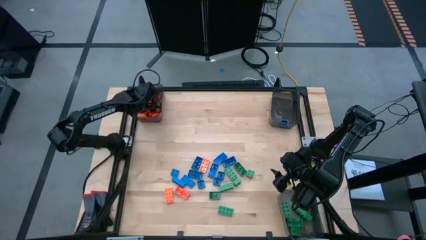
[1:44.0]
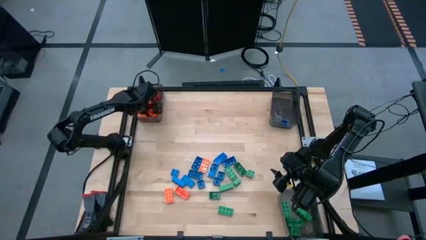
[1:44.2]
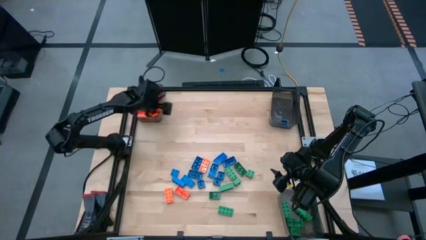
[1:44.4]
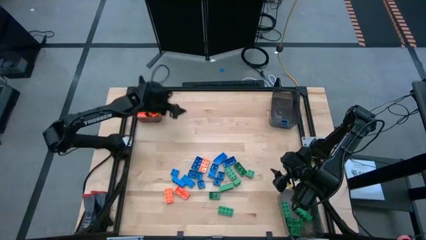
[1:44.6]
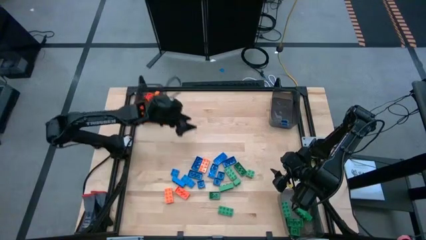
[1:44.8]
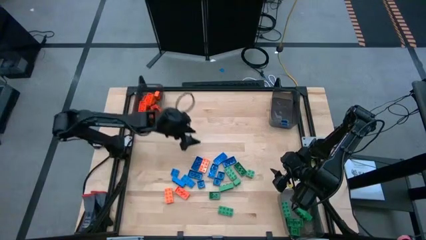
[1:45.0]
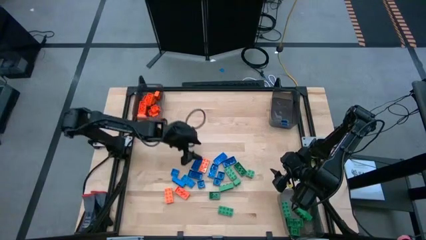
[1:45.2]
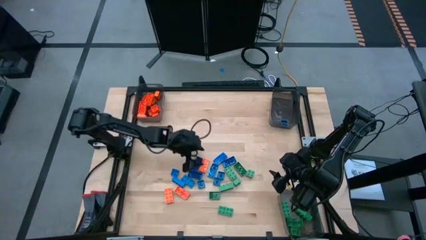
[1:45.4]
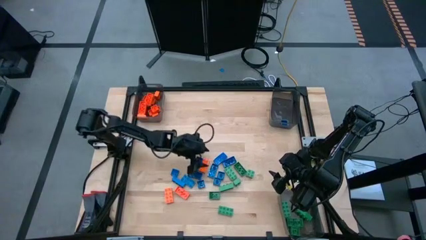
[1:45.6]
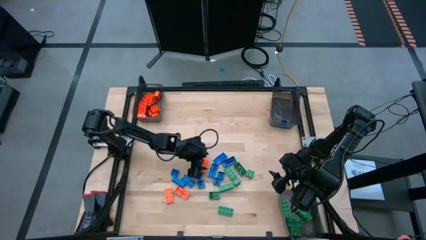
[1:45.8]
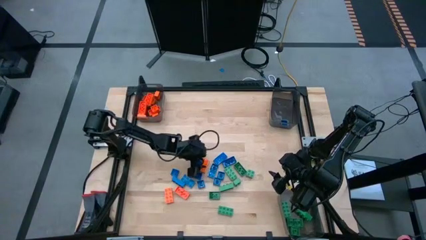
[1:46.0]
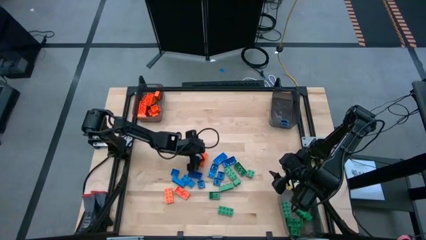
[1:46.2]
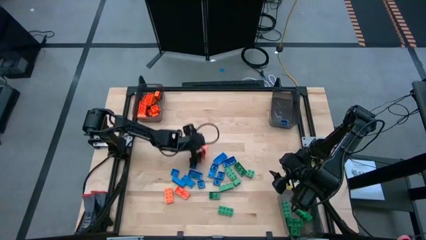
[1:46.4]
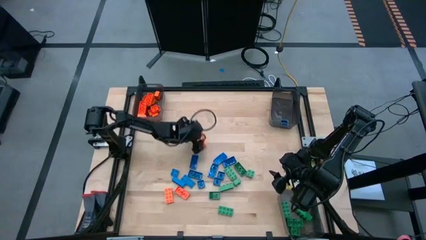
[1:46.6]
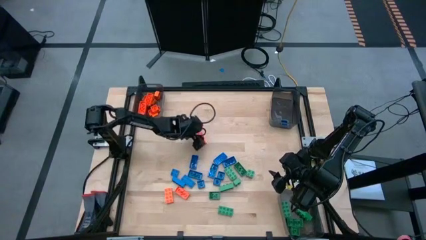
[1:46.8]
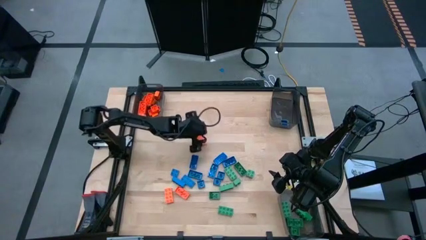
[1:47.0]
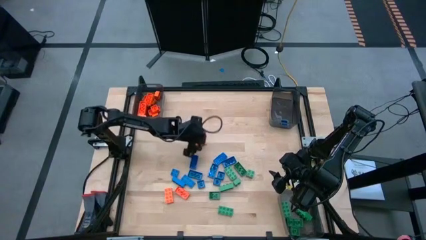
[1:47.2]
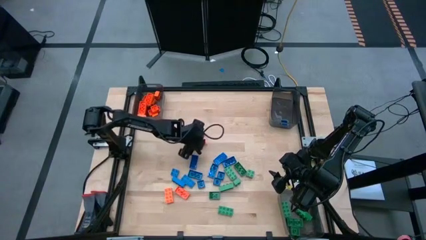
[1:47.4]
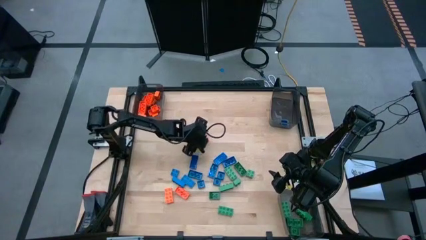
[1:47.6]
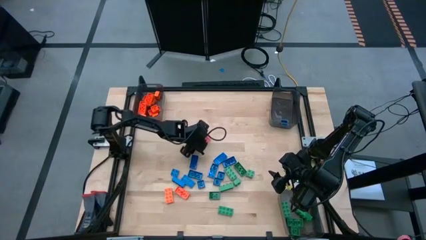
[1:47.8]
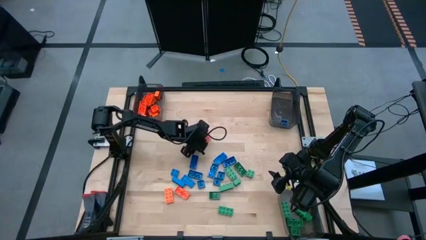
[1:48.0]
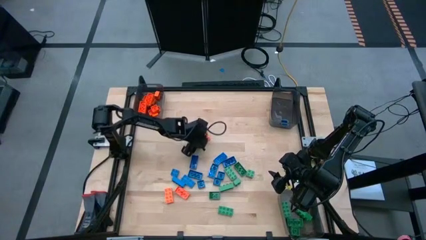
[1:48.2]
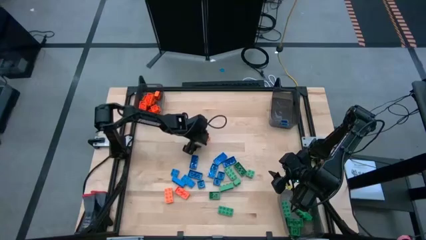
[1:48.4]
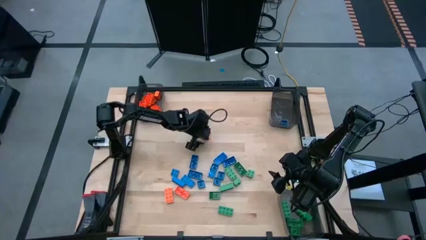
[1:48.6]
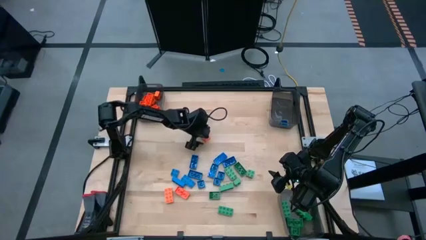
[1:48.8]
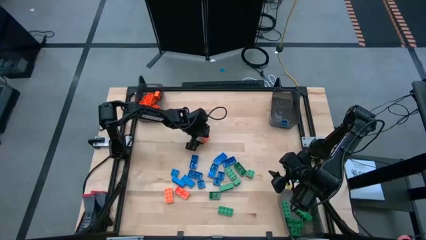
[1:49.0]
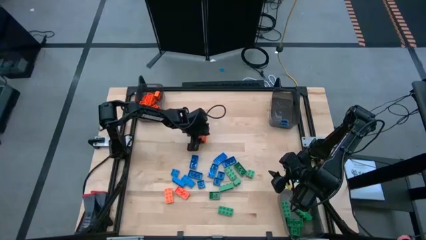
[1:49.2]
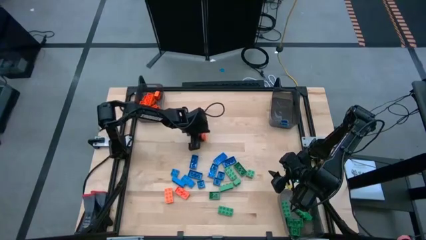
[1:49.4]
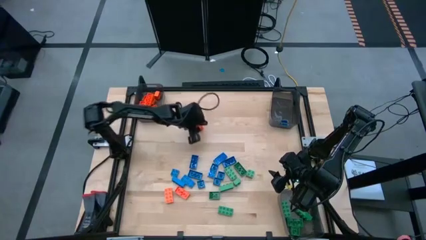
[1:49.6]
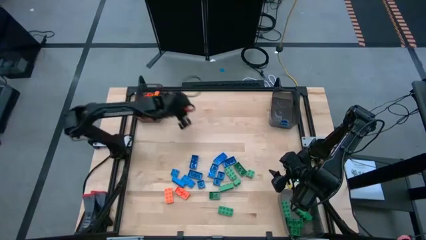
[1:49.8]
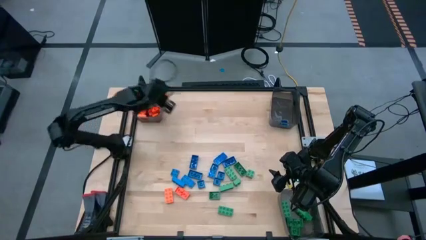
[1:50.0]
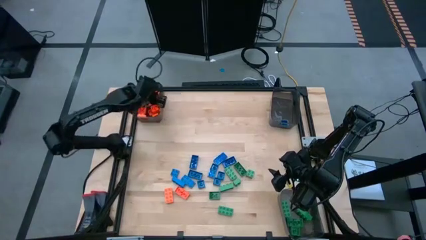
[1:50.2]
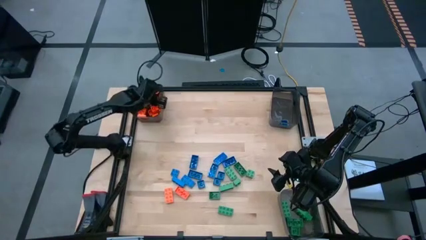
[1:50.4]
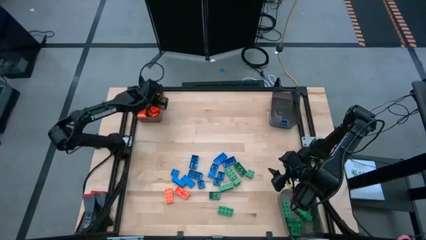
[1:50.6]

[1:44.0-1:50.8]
Task: Sort blocks
Put the orange game piece into the top left black bin

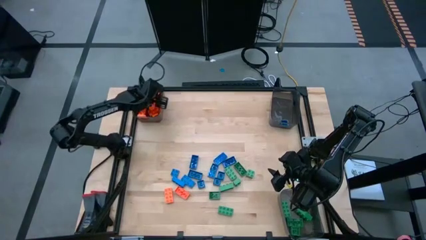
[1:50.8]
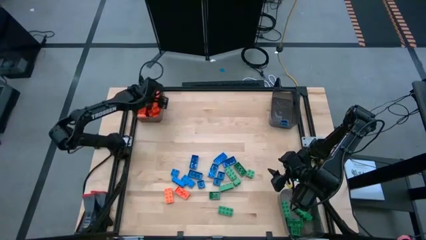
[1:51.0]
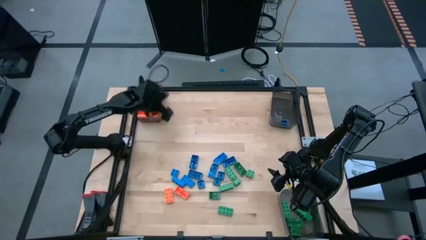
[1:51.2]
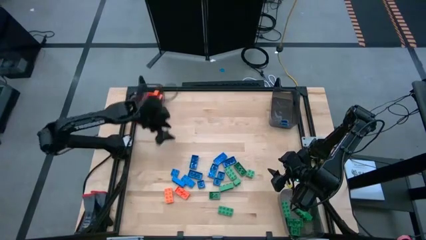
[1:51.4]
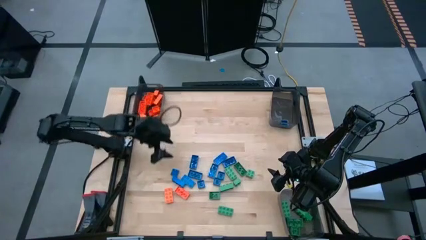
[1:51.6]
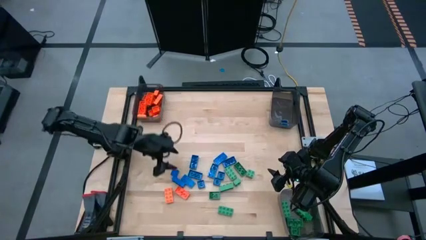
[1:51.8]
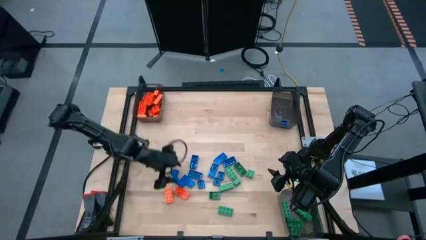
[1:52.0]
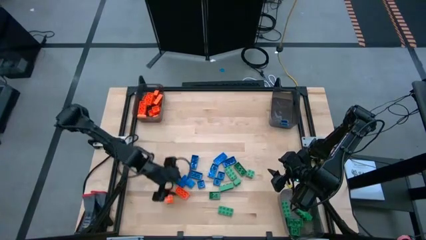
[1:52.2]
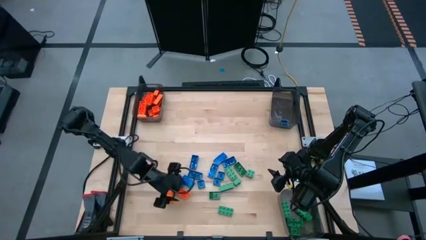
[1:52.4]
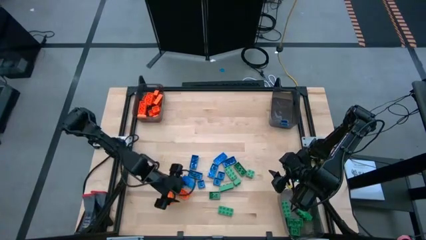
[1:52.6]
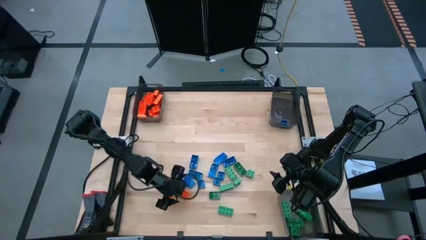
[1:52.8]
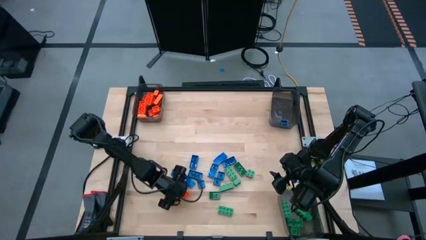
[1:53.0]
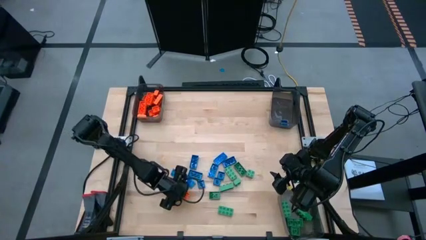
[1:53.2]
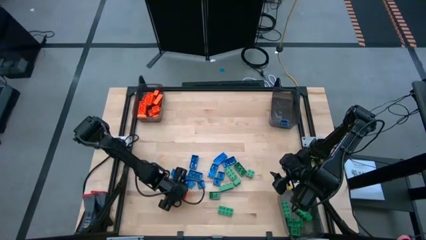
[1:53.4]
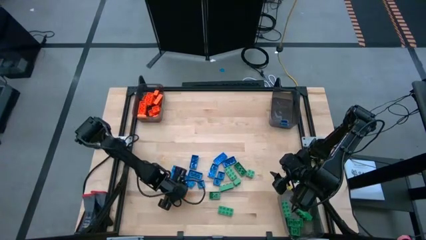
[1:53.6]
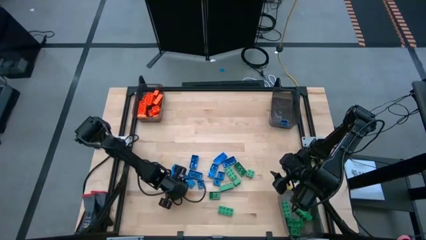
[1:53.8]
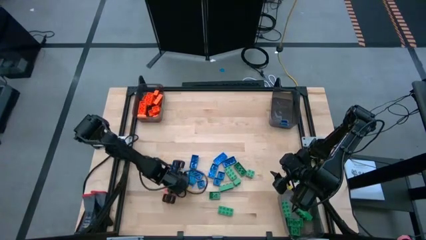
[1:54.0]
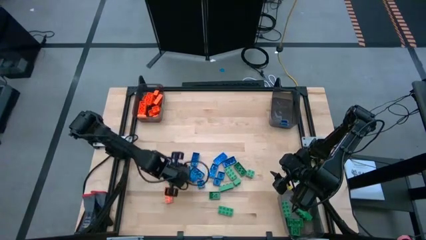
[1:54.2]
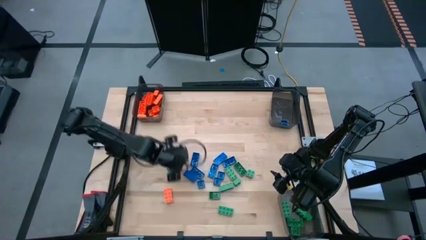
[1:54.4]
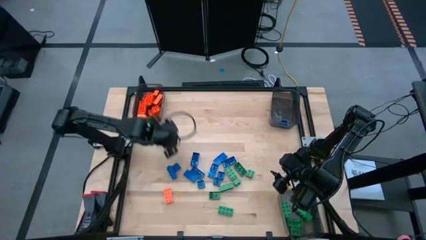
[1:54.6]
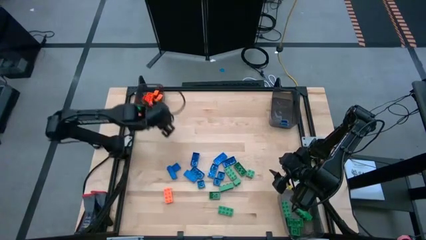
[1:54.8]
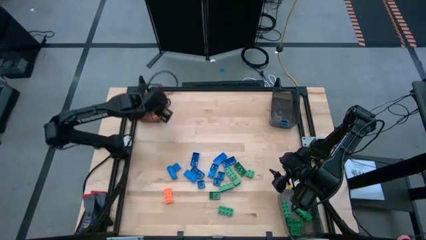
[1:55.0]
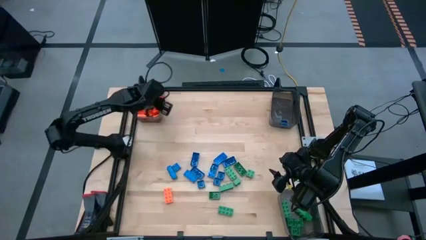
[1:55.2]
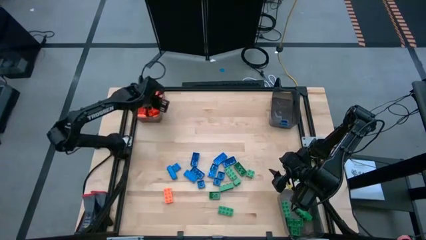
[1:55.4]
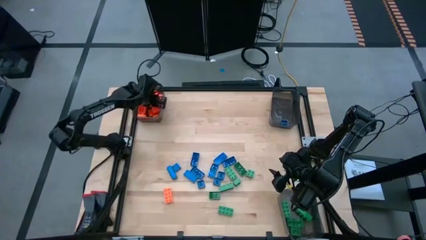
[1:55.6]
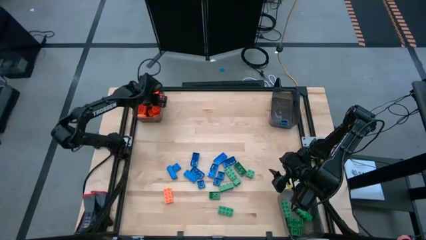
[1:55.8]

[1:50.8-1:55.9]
Put the orange game piece into the top left black bin

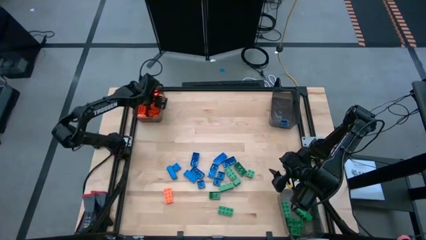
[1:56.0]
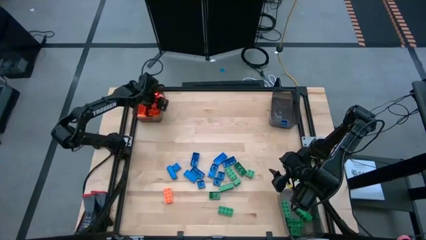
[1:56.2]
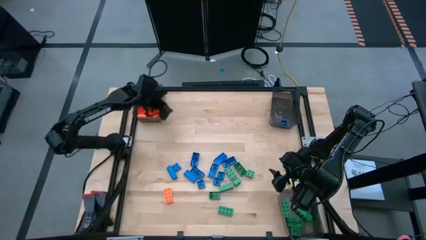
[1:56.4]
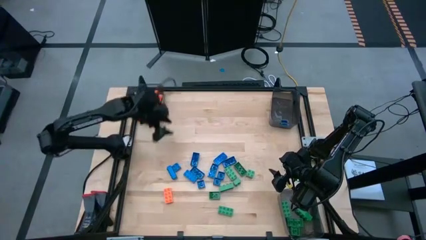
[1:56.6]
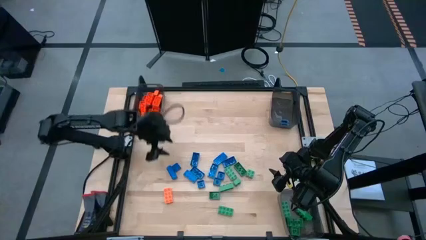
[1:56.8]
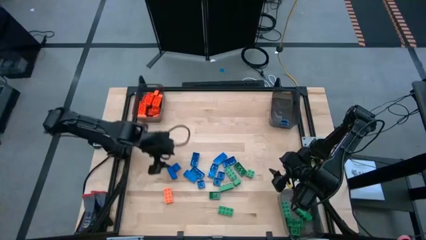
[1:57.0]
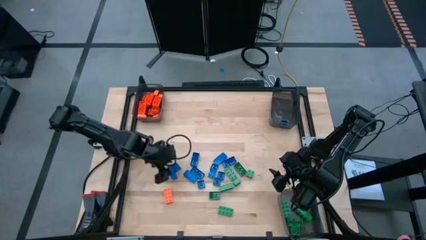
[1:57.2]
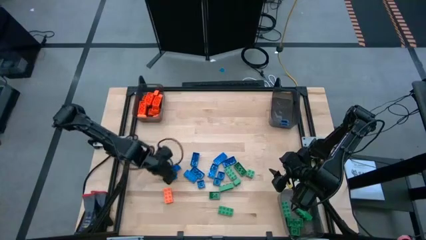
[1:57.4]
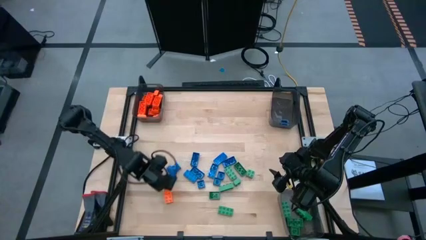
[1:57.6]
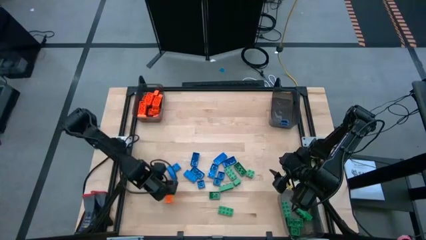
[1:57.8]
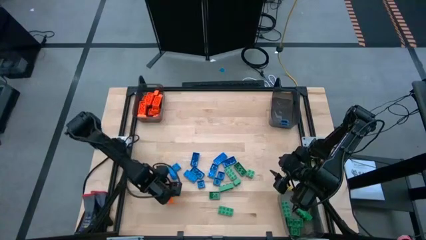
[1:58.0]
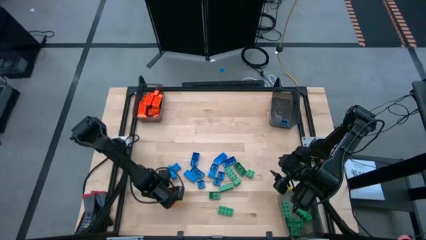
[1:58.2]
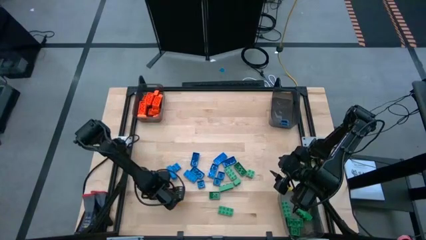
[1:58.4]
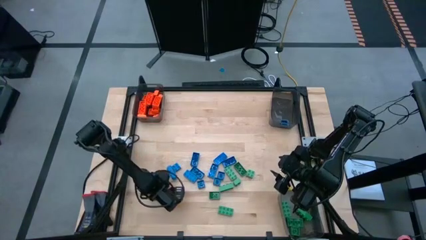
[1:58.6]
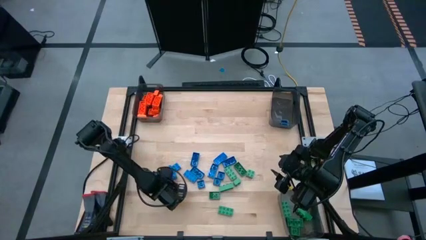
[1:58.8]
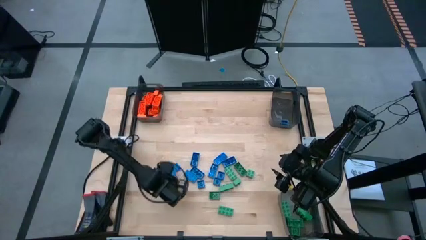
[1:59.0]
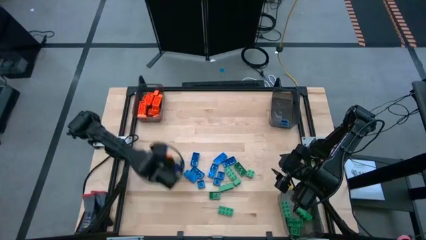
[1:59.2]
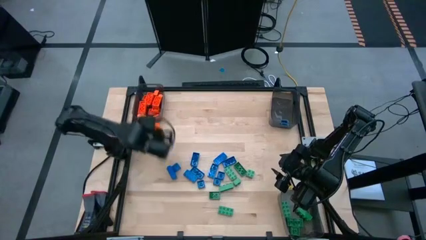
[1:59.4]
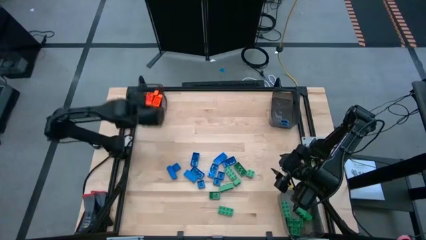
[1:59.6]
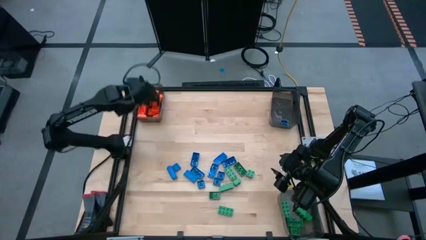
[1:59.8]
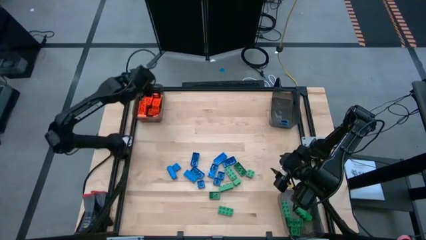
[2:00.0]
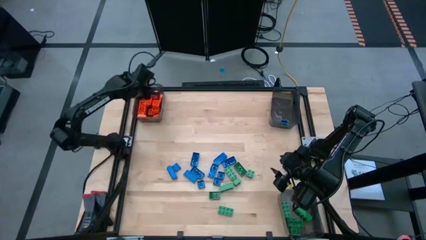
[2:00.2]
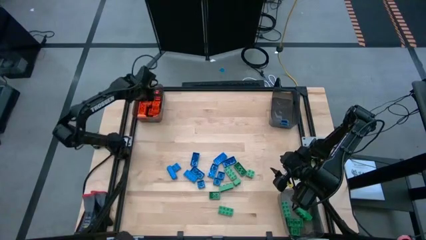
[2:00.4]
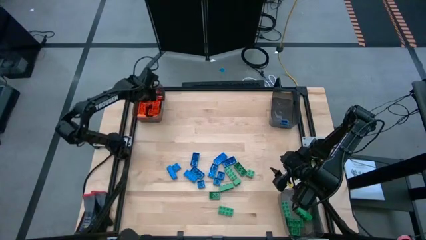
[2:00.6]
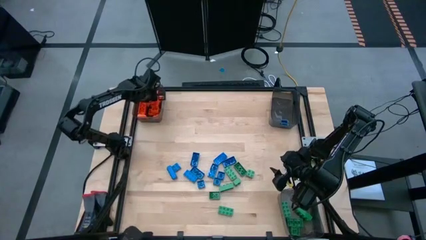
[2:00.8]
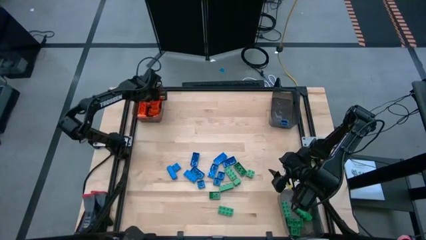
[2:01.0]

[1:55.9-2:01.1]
Put the orange game piece into the top left black bin
